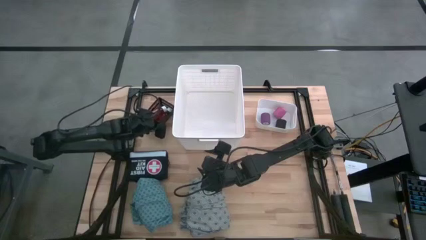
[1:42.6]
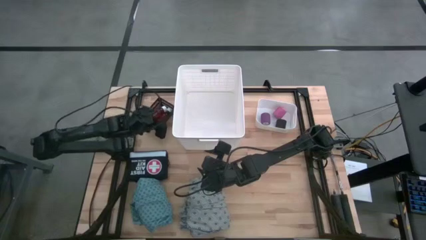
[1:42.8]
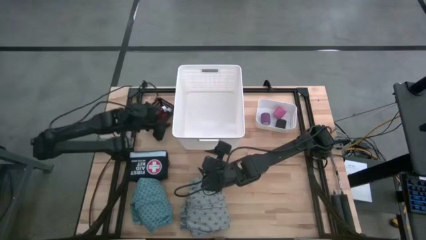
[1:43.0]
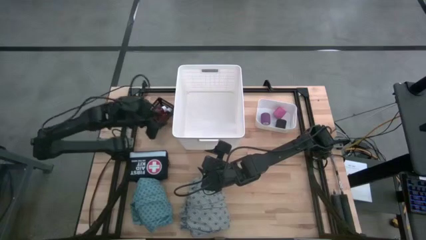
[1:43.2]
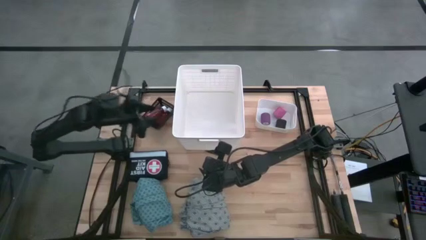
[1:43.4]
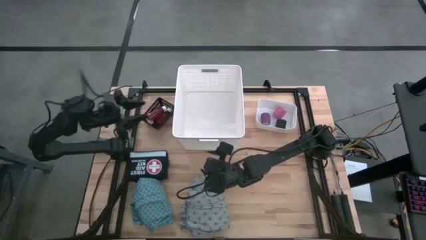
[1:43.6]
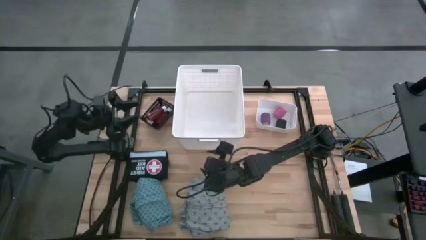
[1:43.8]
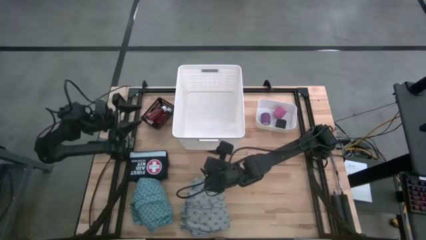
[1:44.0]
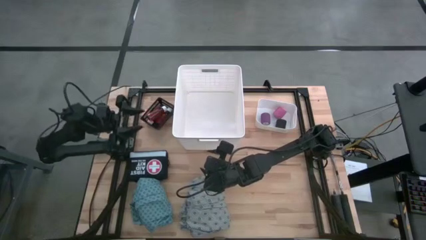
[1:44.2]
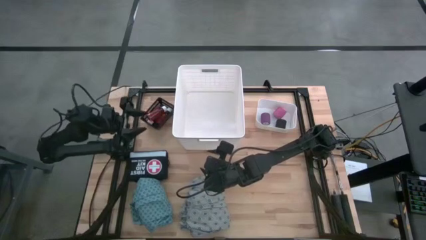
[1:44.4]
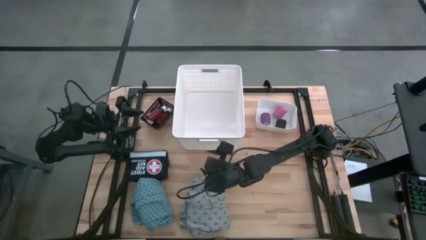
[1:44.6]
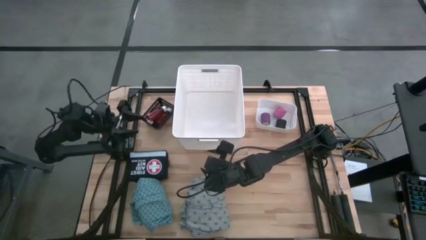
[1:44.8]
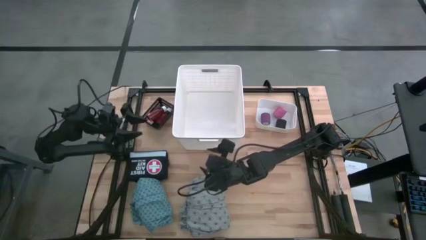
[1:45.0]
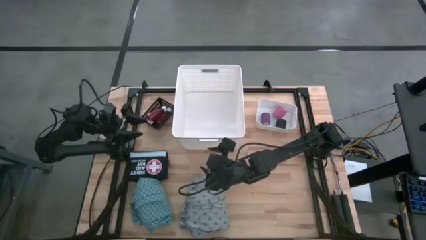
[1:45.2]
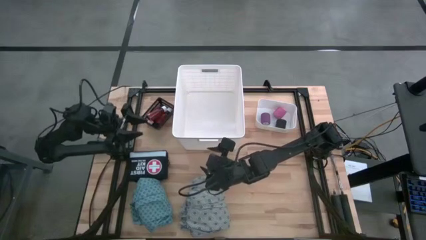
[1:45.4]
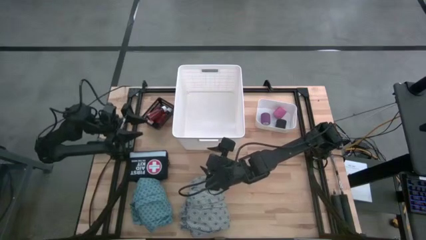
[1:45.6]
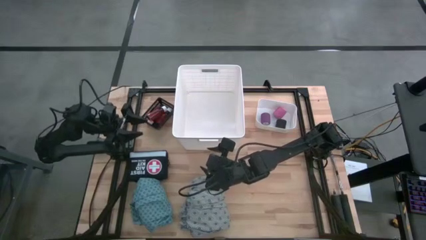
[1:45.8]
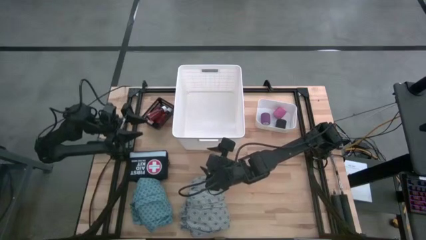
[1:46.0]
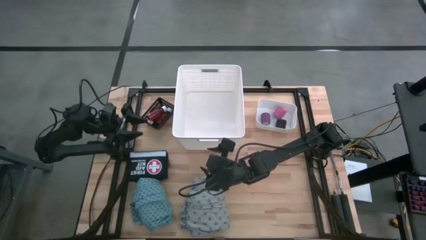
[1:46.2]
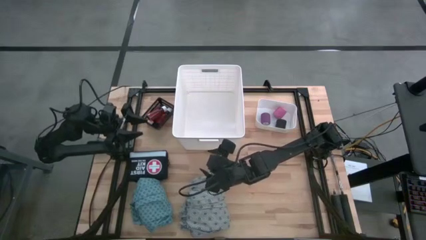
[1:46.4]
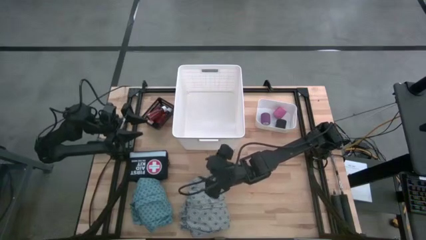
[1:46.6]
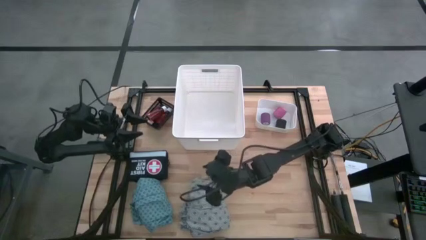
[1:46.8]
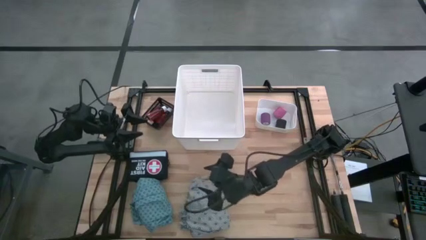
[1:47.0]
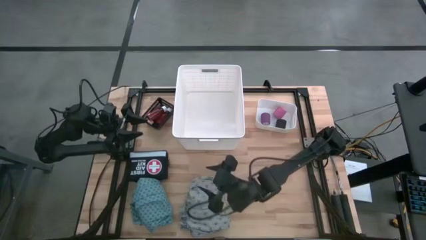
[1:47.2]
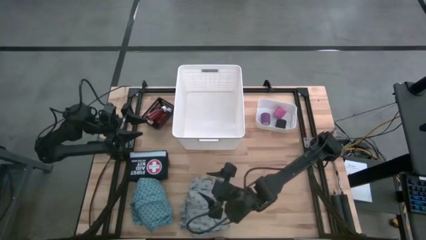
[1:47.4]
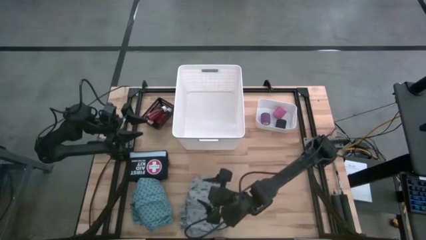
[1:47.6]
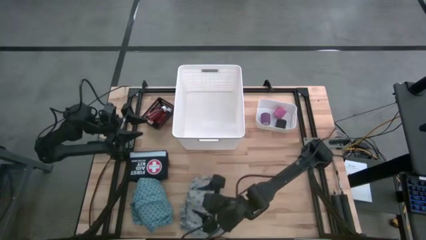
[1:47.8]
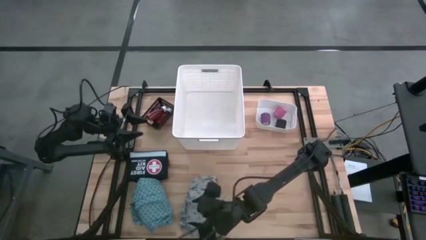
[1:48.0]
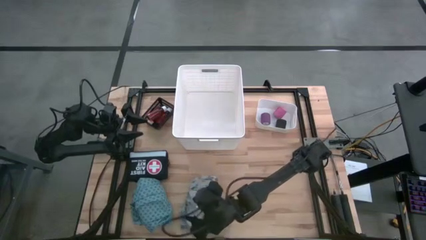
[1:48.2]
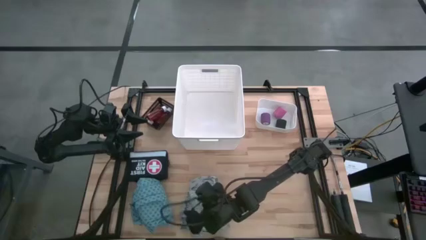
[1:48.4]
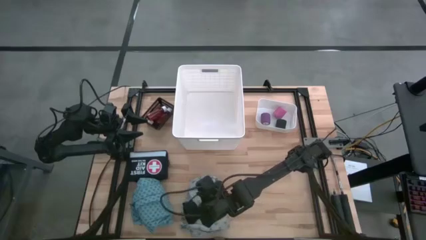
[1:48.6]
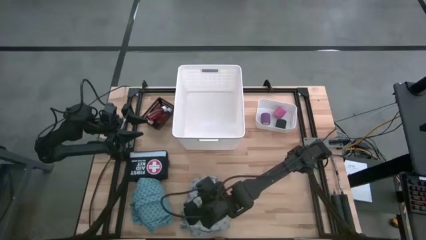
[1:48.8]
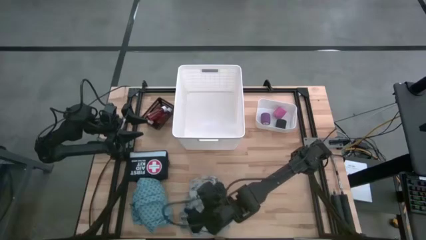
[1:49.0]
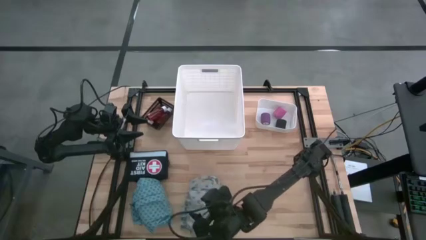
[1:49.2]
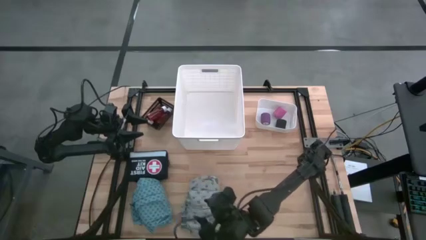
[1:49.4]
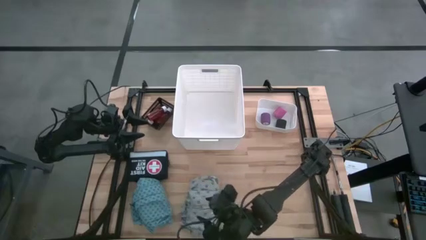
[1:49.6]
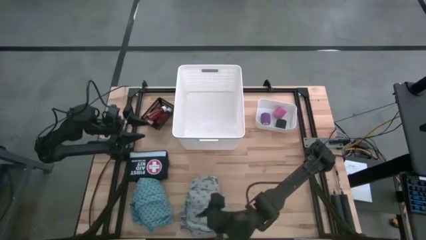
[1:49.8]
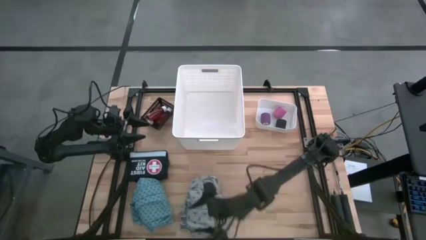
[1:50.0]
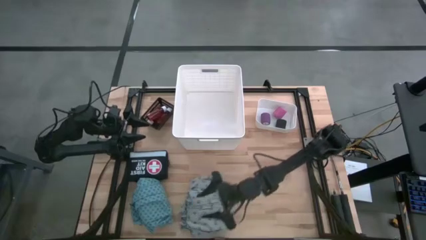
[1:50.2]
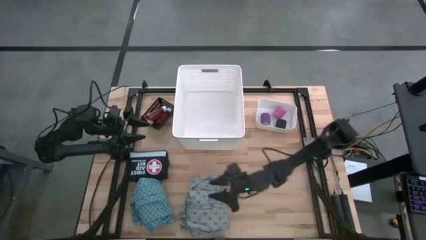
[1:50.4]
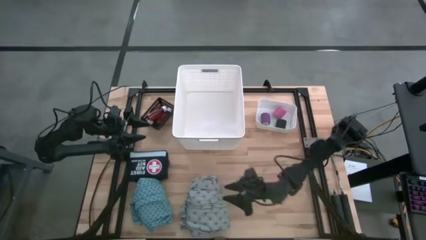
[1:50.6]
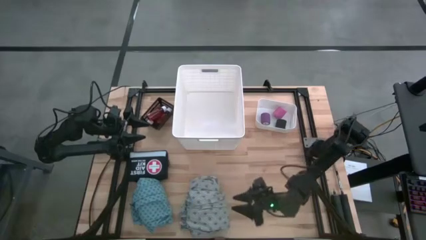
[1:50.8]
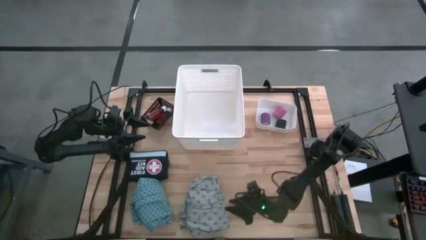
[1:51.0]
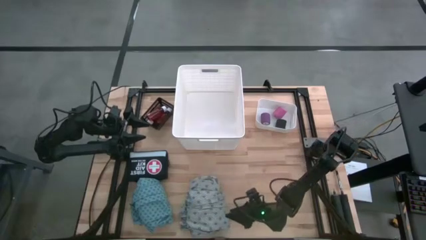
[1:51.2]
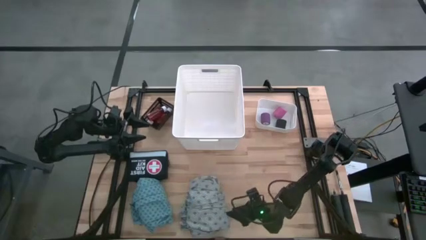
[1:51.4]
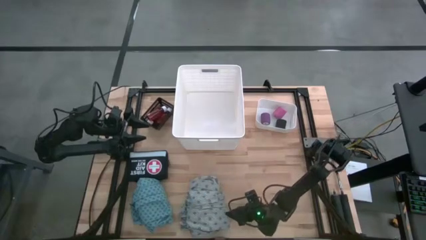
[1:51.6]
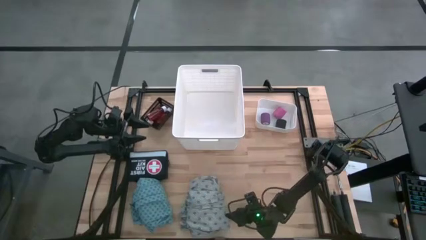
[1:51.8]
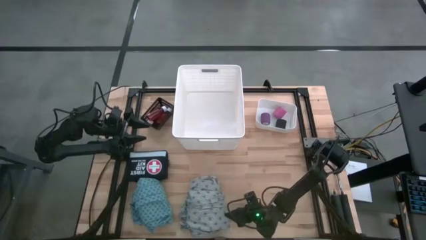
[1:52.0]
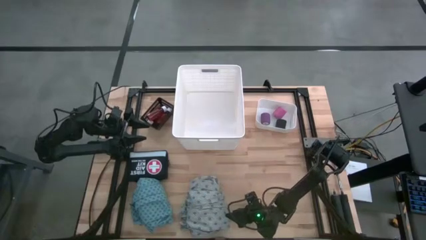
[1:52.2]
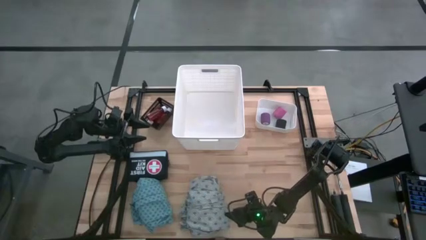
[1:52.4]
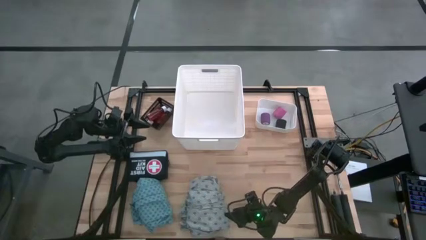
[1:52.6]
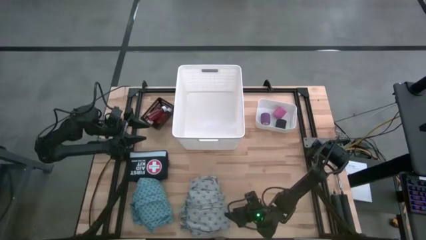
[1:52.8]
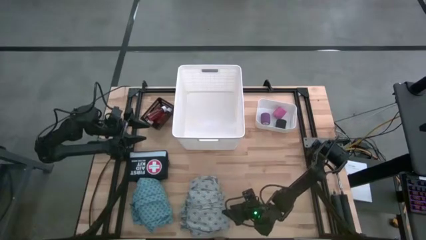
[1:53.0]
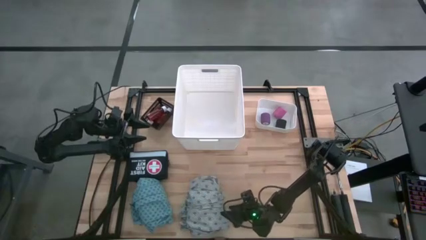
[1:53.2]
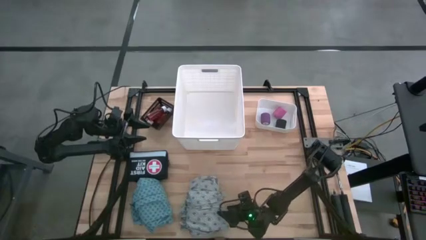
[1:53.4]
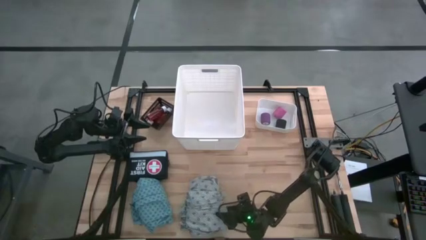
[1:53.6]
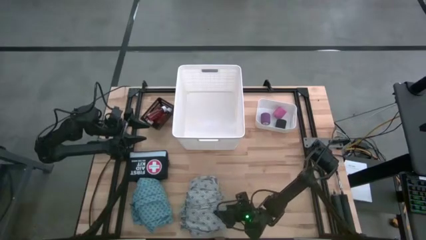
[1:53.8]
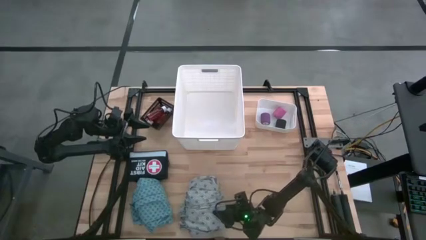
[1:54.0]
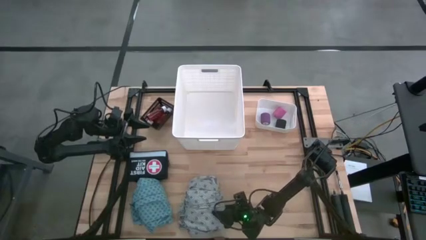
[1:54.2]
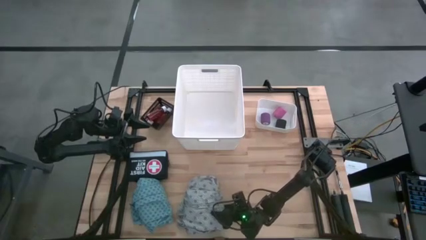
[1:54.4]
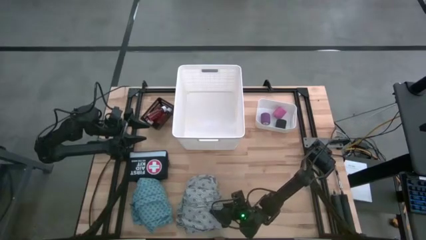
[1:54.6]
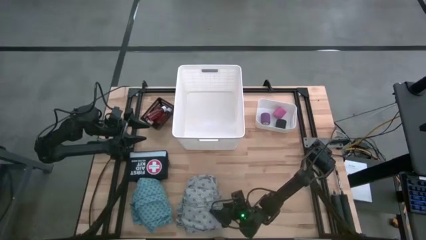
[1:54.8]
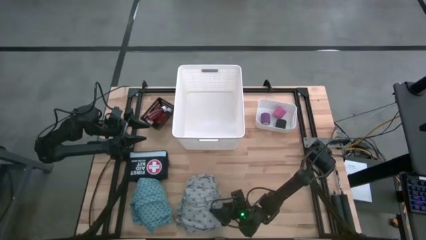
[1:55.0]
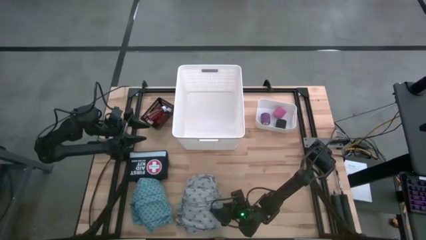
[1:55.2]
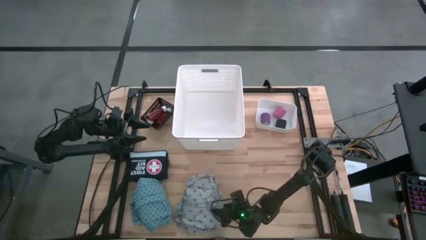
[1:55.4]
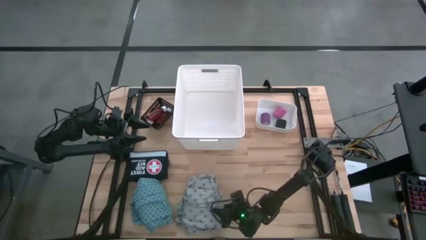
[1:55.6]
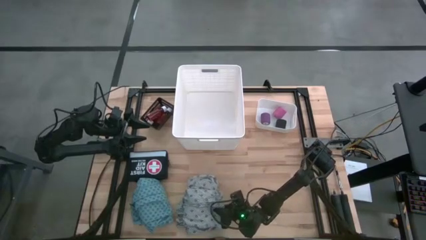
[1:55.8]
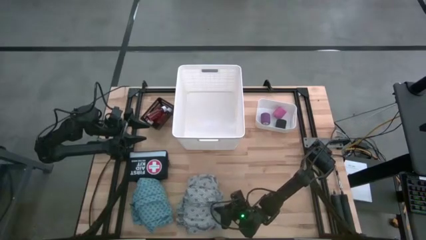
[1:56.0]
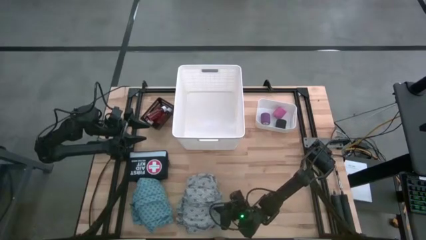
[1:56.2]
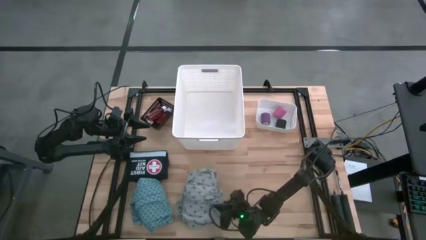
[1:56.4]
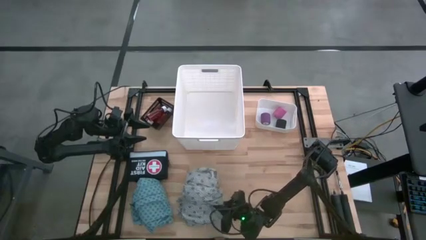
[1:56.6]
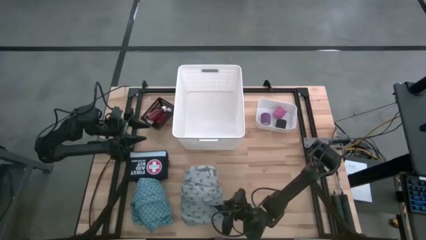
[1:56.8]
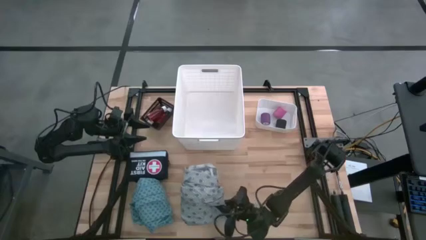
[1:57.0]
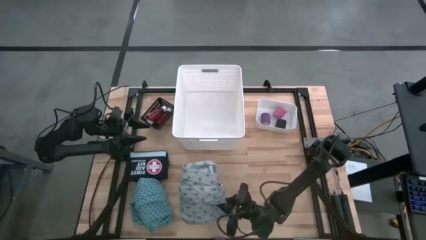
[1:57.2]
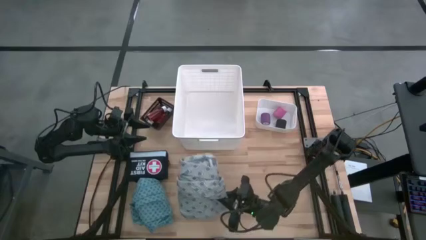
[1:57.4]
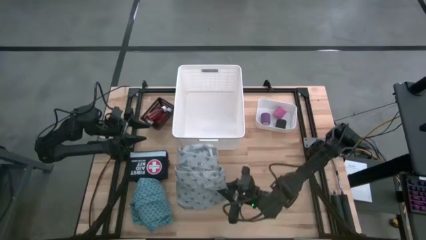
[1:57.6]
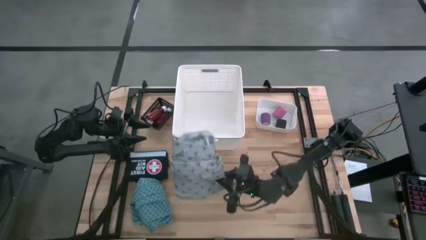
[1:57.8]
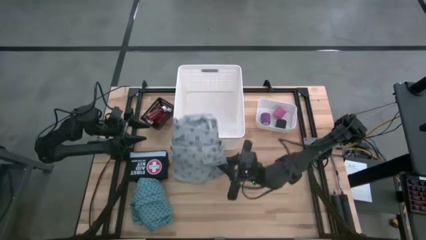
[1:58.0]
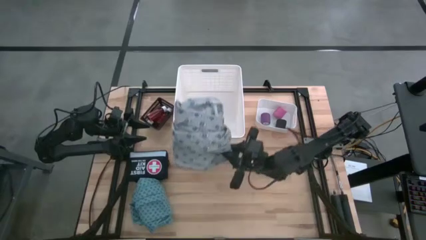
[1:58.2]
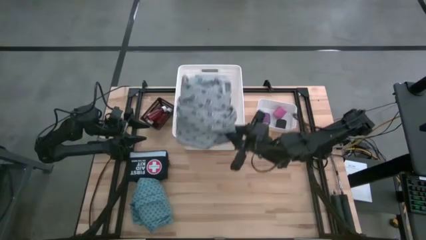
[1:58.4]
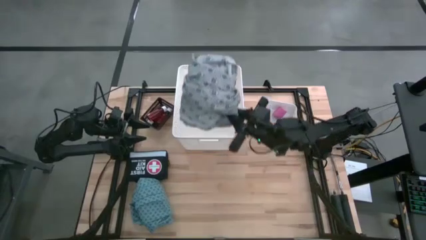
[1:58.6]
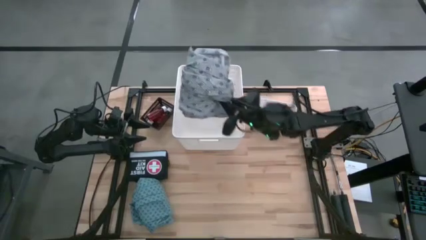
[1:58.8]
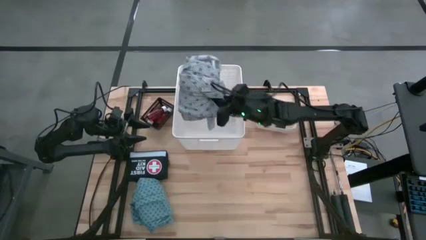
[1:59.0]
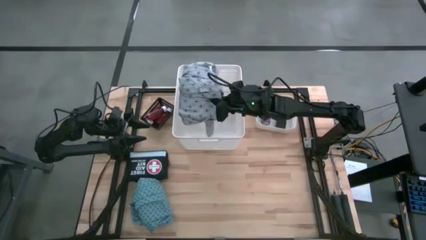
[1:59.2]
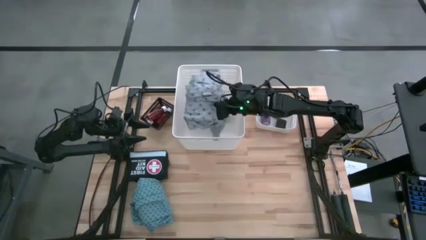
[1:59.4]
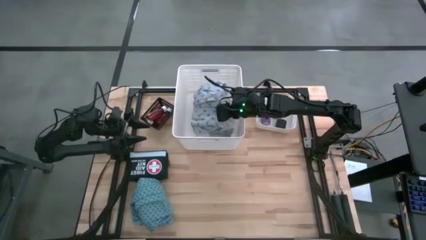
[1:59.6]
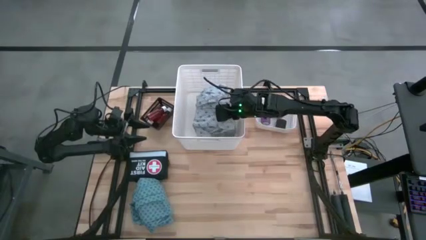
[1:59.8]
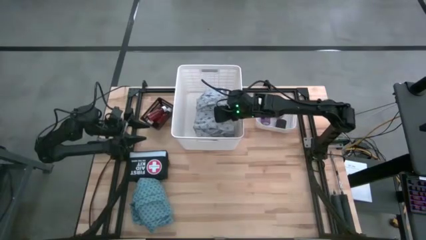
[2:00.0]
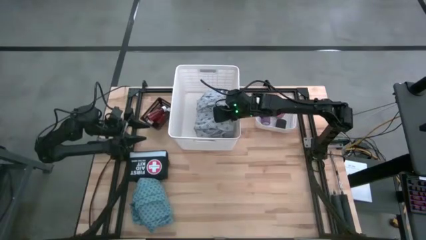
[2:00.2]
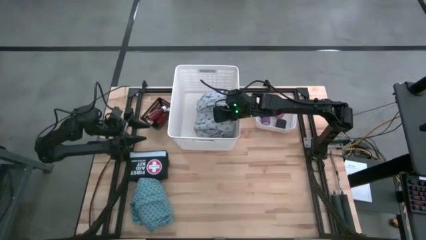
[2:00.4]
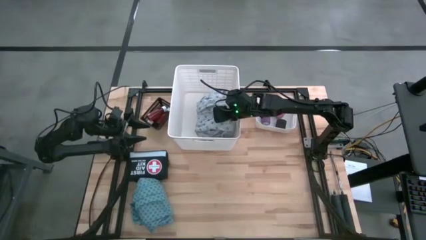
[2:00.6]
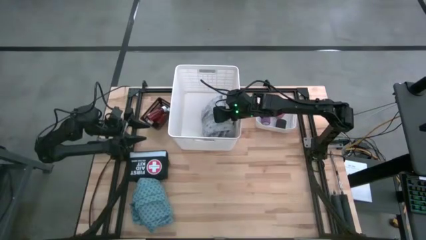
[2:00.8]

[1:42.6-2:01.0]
Task: Pick & Place Medicine items
Put the gray patient gown into the white organizer
